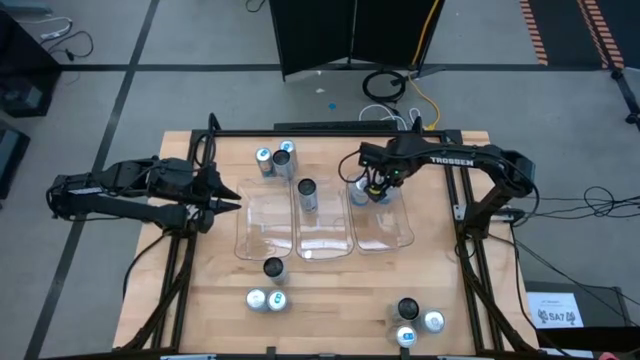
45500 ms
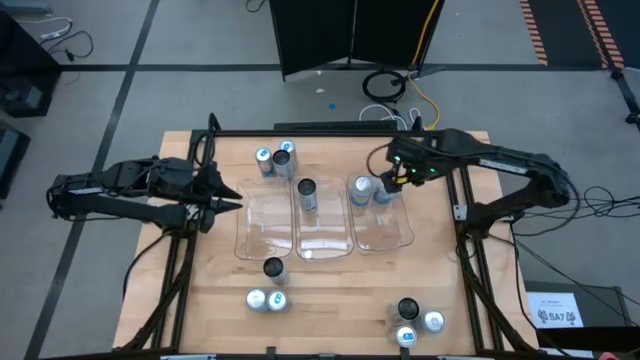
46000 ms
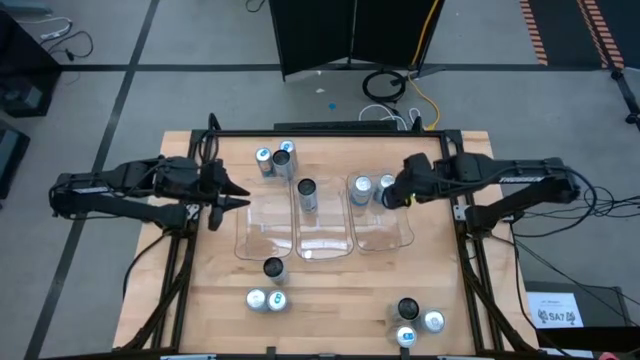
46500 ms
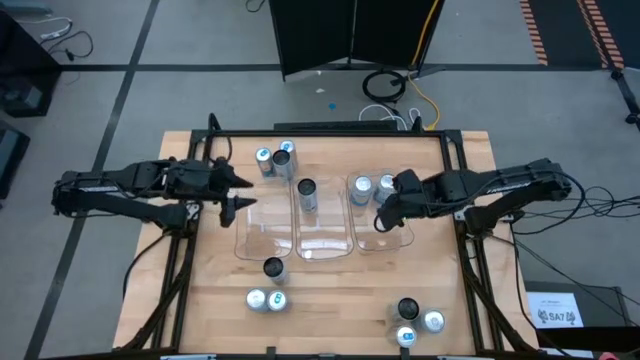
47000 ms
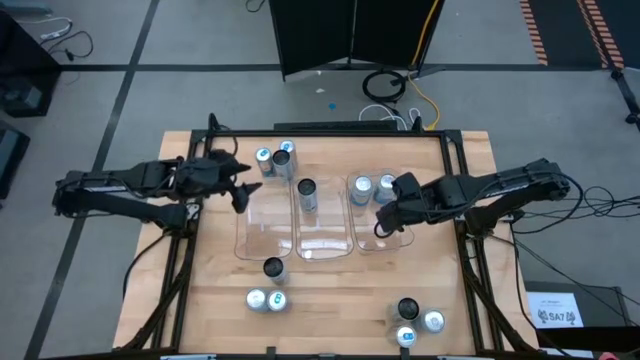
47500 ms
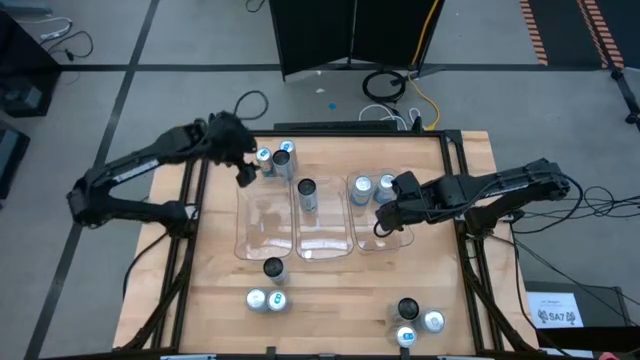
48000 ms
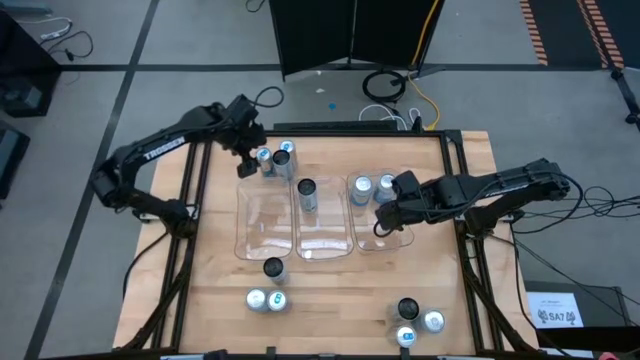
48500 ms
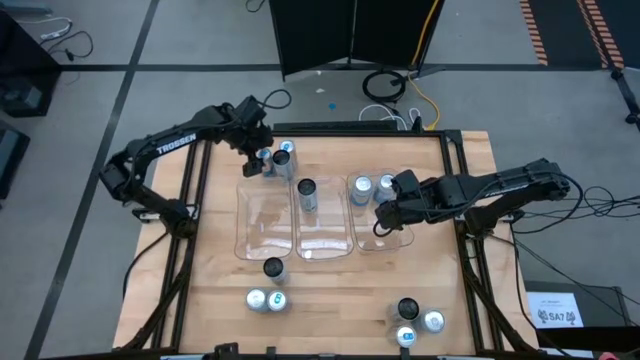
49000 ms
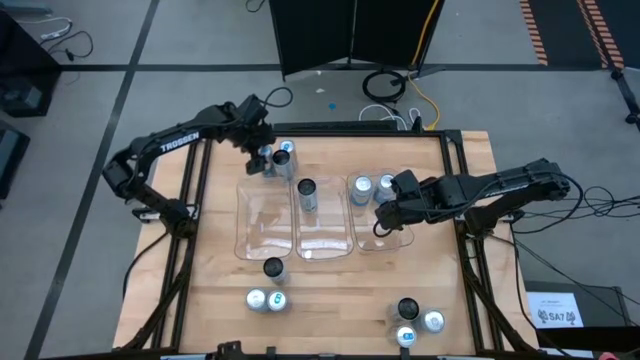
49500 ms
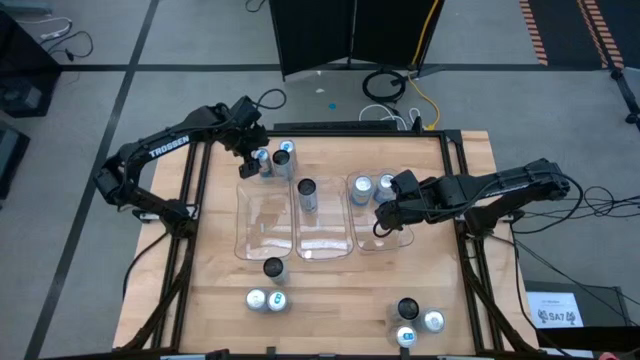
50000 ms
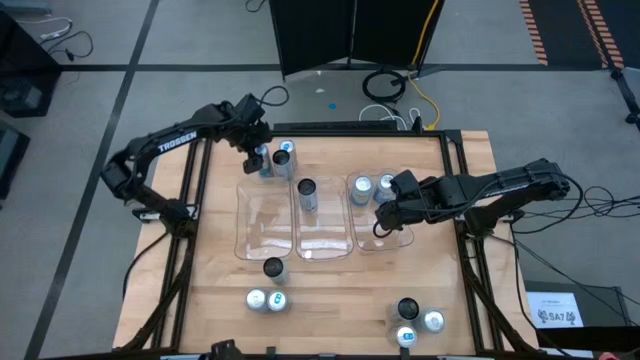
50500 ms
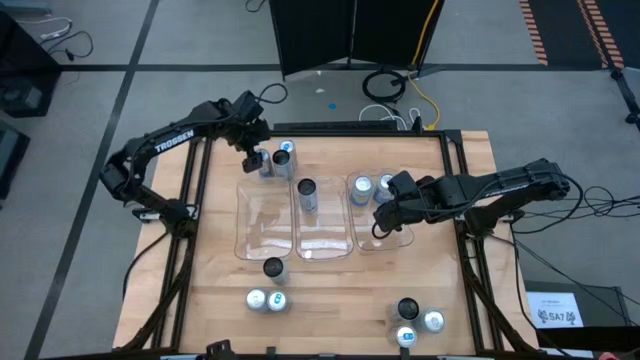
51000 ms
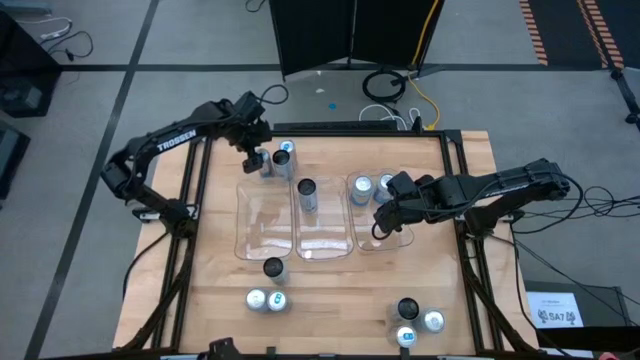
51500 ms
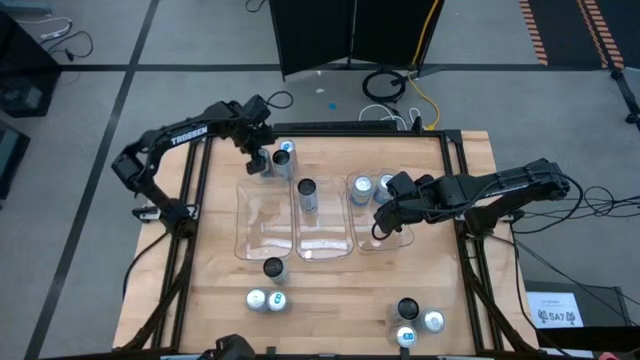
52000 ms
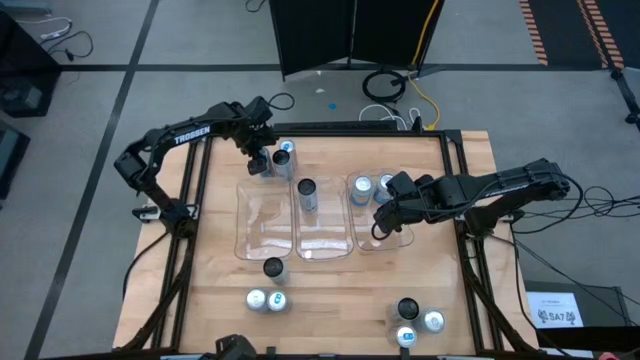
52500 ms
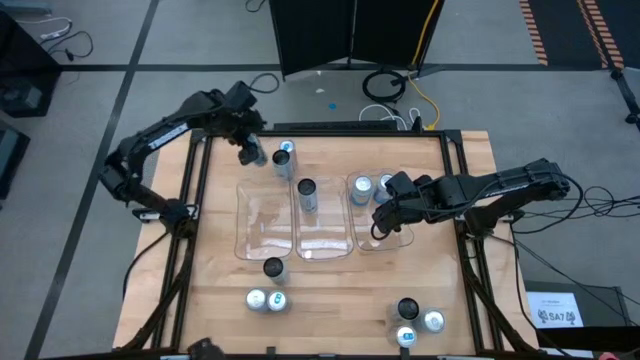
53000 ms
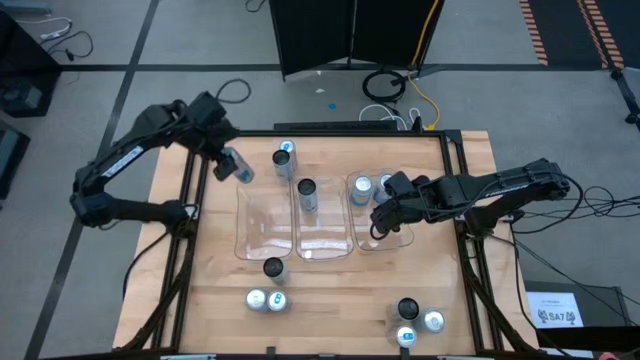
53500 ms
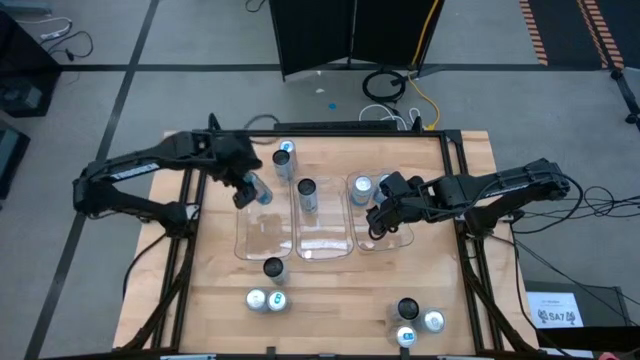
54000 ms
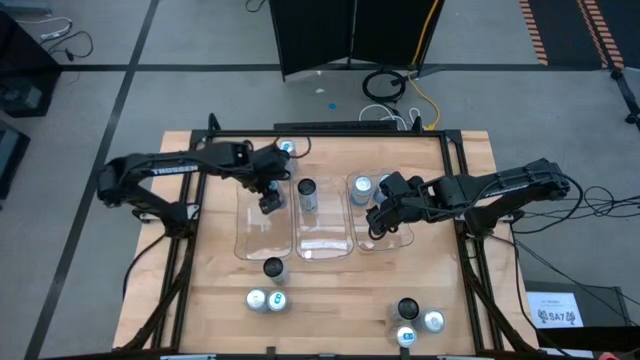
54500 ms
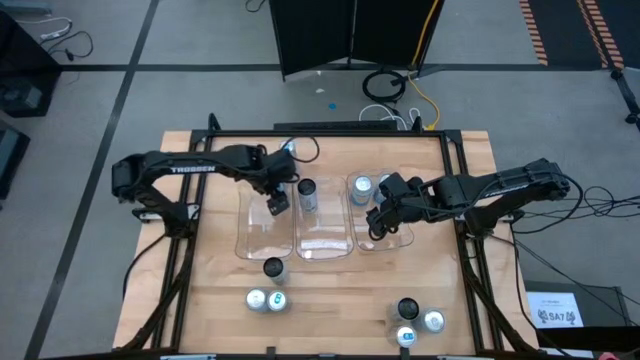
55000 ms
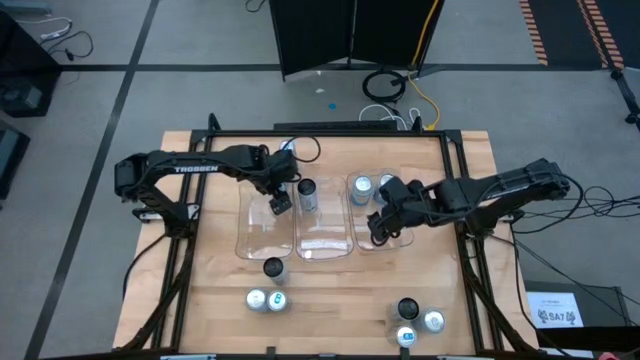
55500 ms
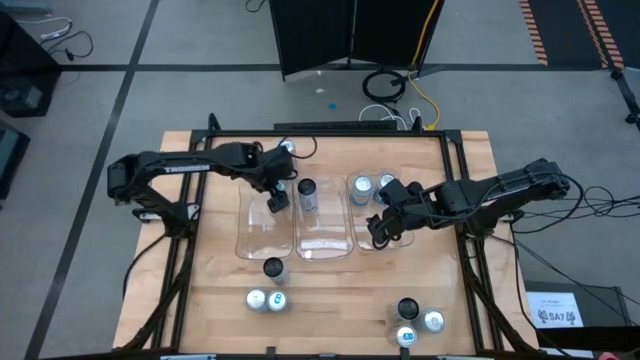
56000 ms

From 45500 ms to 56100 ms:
Task: Sort soda cans
Put the top left blue soda can into the left transparent bin

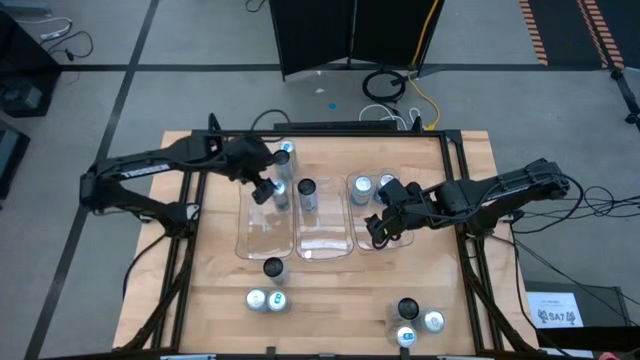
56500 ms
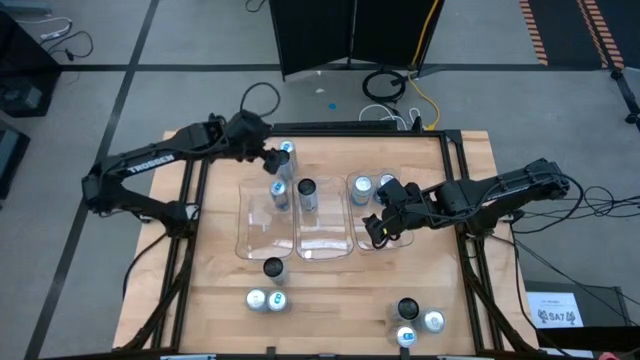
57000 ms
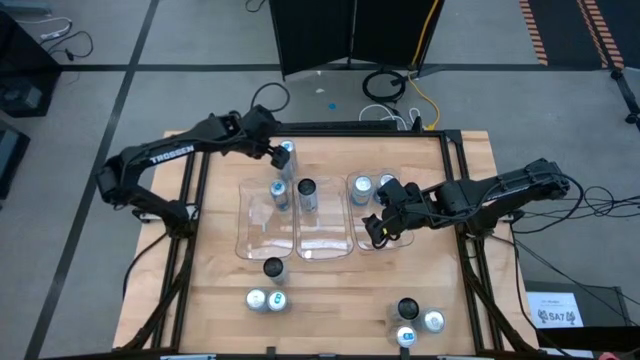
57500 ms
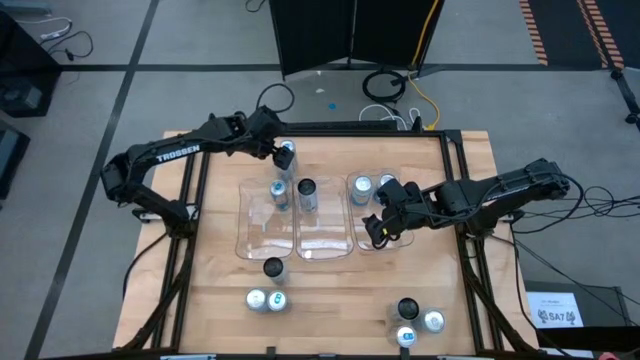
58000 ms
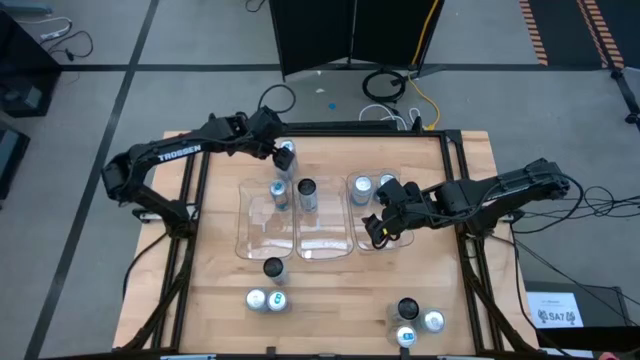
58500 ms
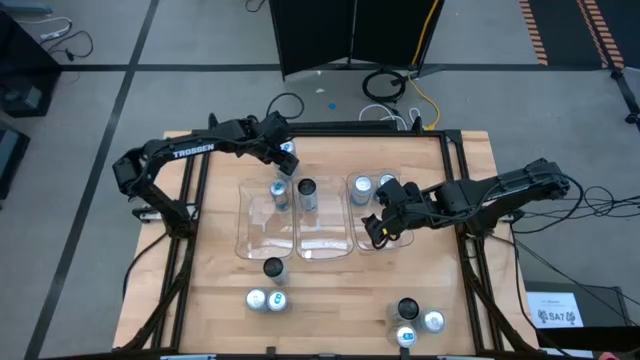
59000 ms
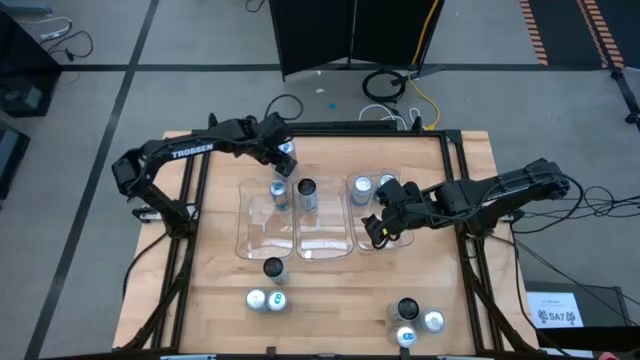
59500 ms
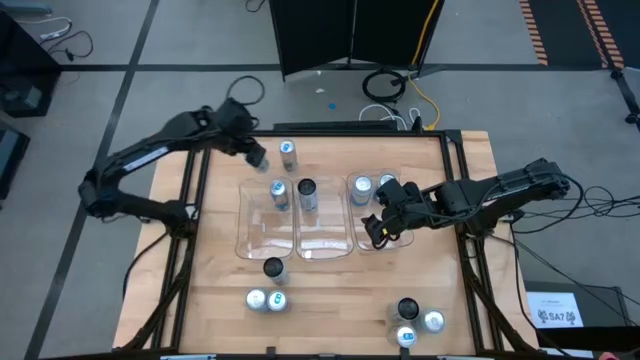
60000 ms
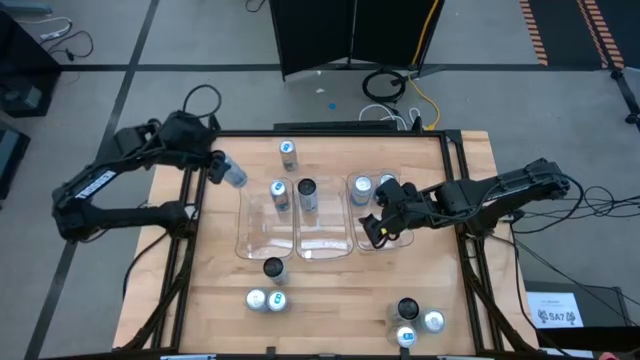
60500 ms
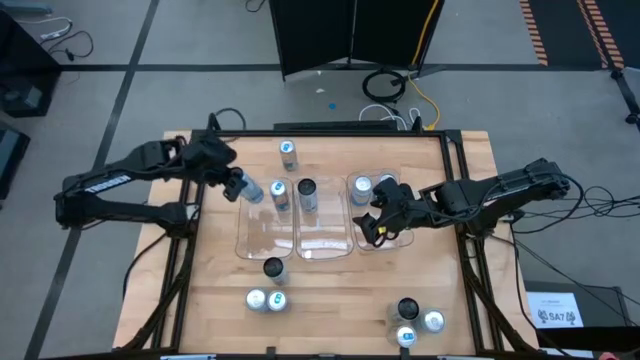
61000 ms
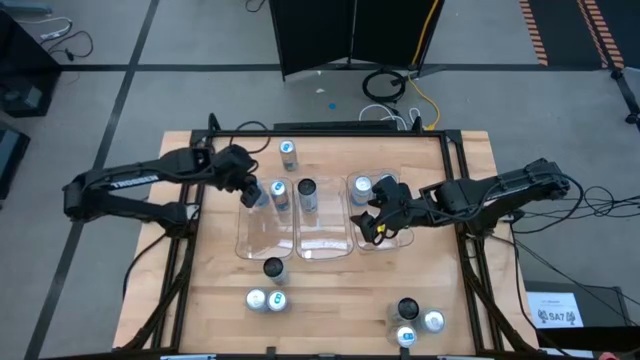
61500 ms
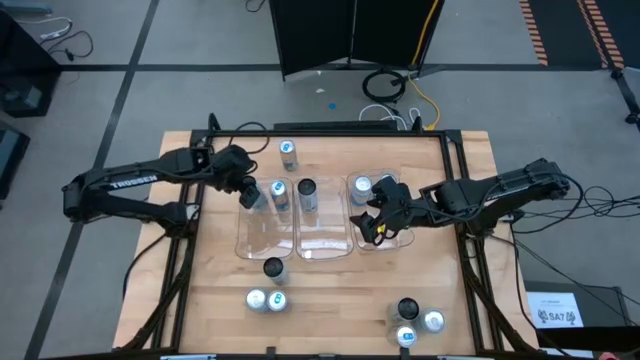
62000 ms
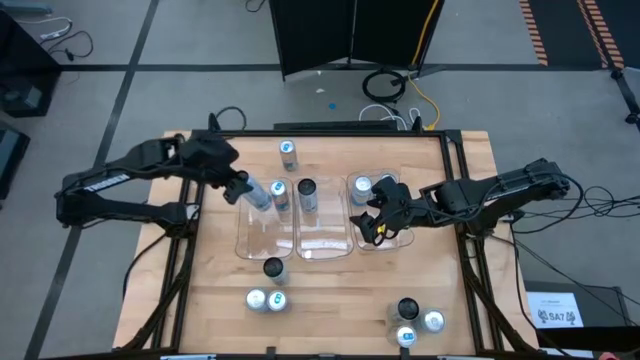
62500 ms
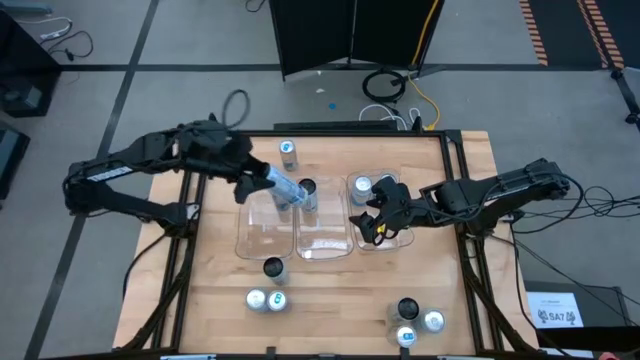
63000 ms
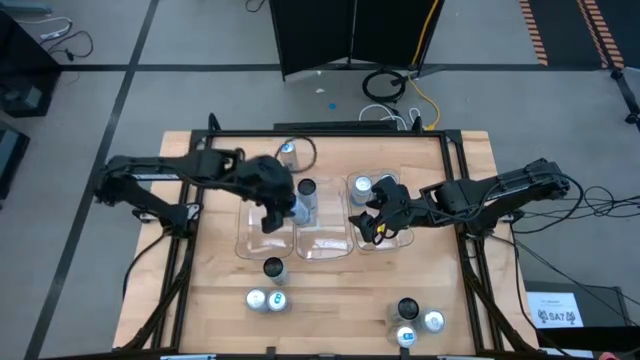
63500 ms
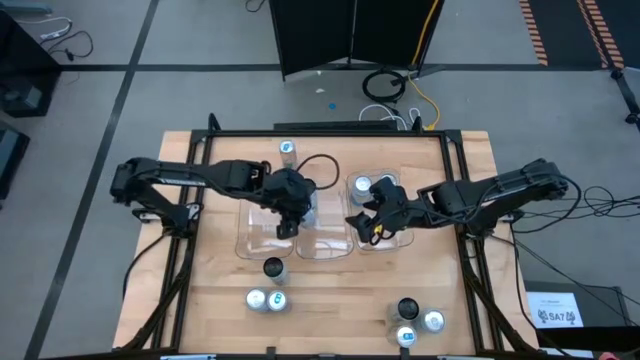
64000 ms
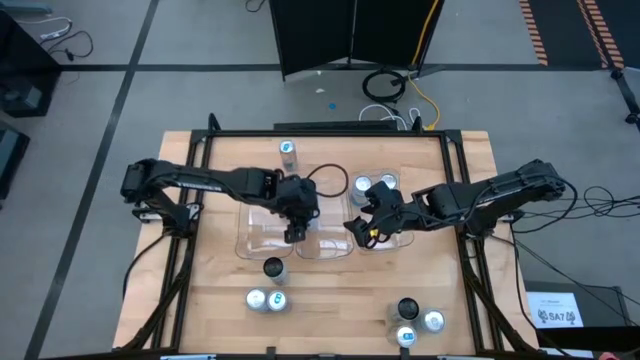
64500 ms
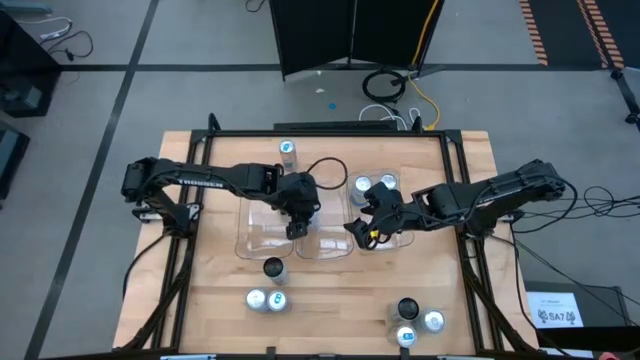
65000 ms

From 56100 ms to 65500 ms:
Put the top left white-blue soda can into the middle transparent bin

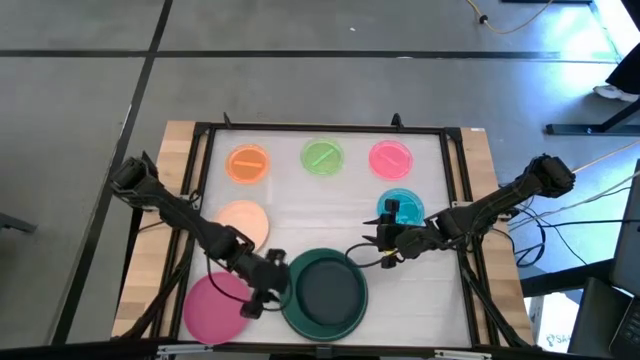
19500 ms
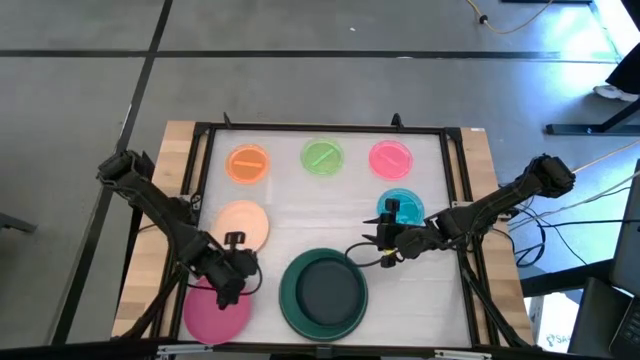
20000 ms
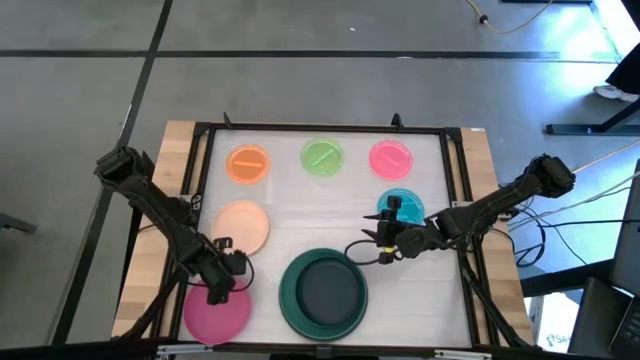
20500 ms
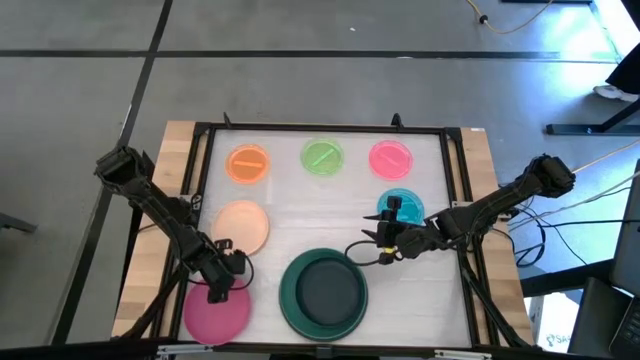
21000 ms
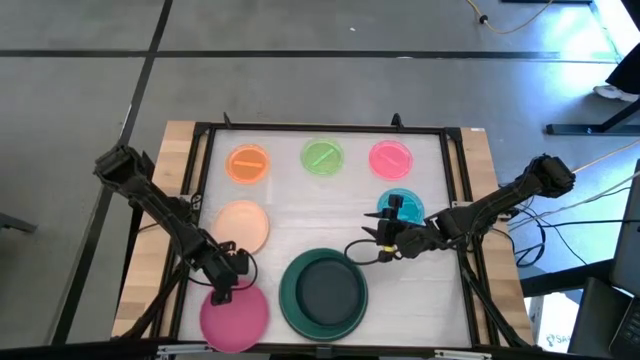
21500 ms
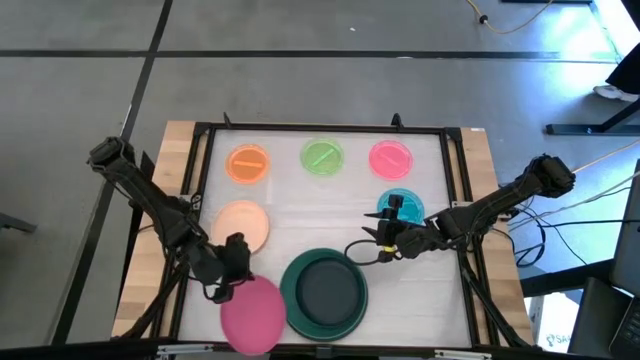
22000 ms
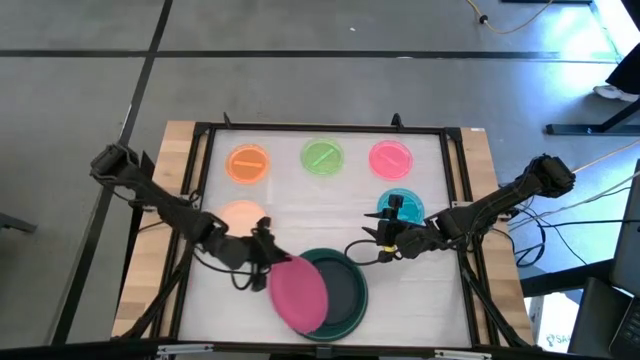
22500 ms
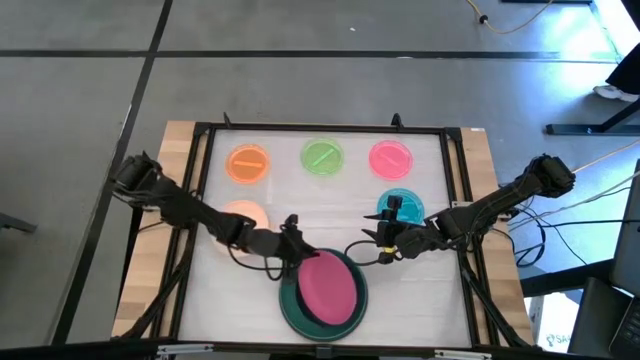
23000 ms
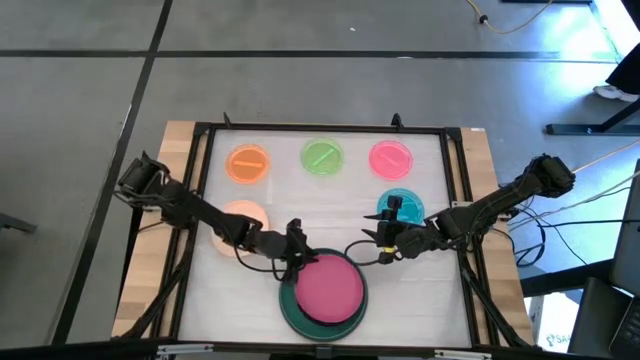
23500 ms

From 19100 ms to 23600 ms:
Task: Stack plastic plates
Stack the pink plate on top of the black plate
